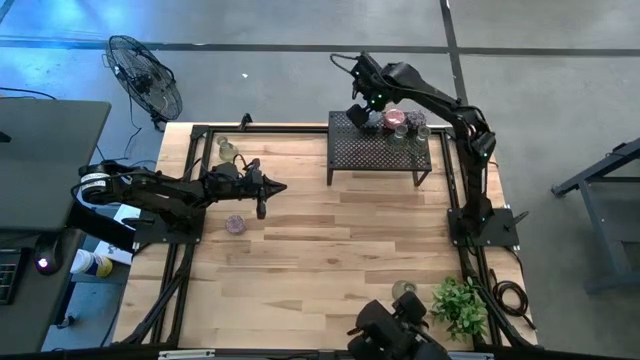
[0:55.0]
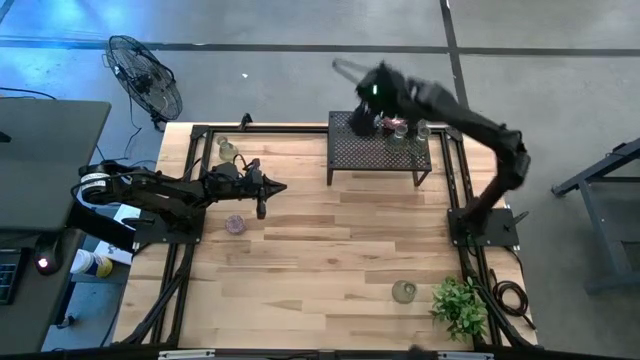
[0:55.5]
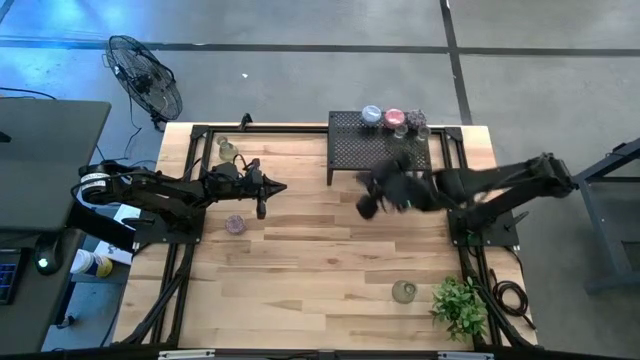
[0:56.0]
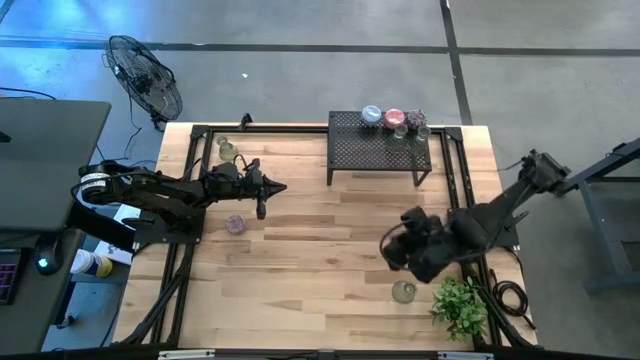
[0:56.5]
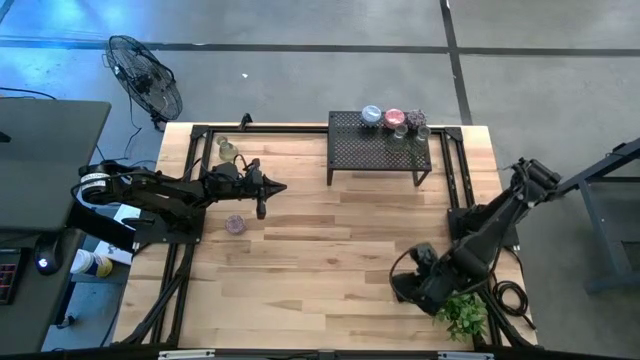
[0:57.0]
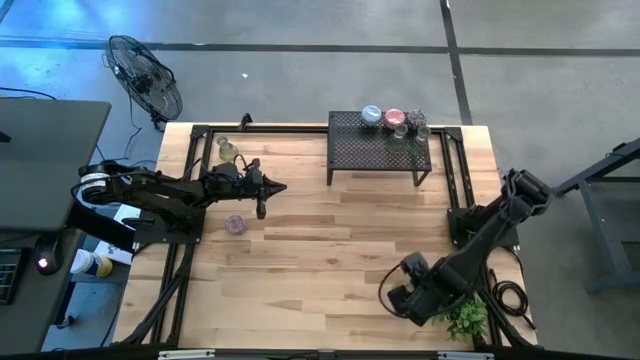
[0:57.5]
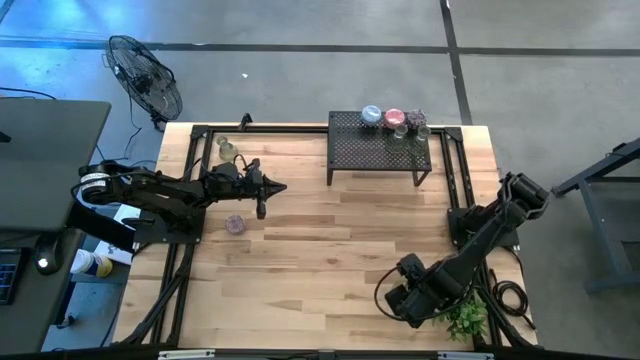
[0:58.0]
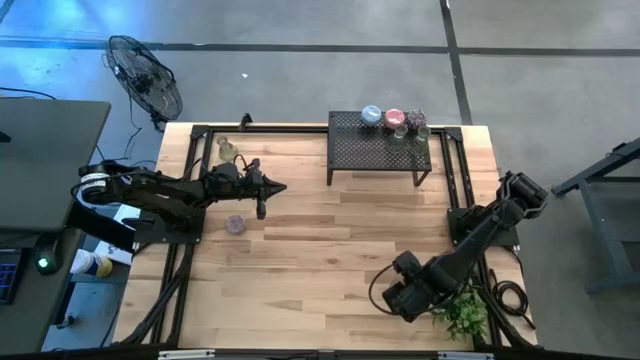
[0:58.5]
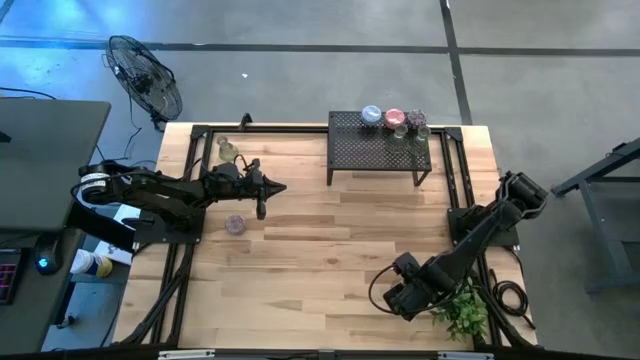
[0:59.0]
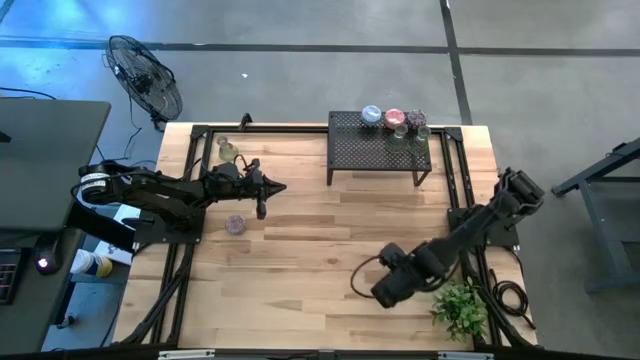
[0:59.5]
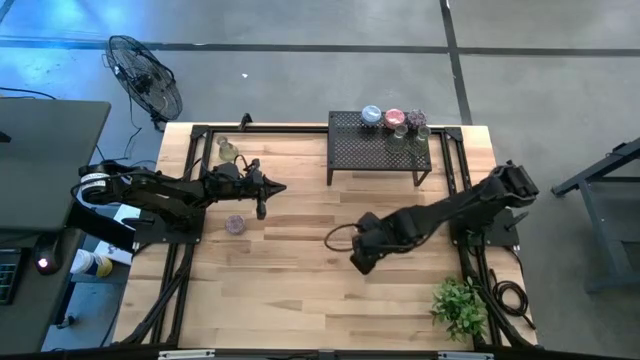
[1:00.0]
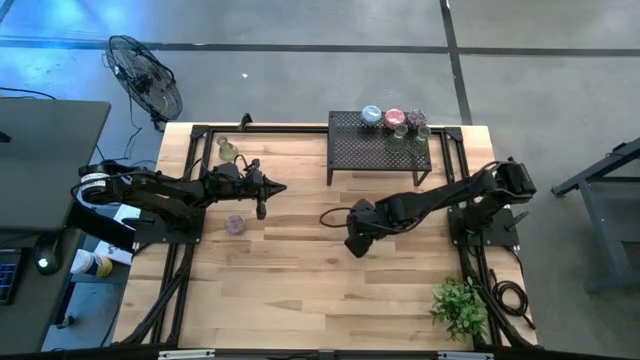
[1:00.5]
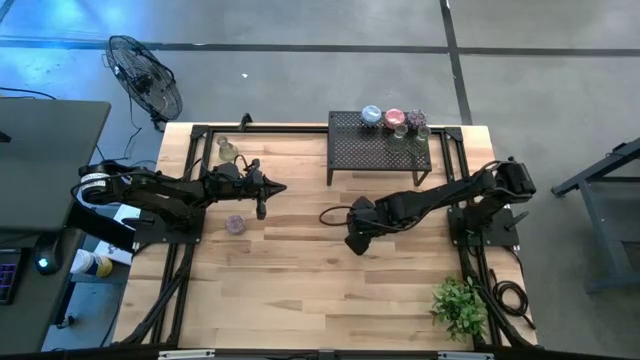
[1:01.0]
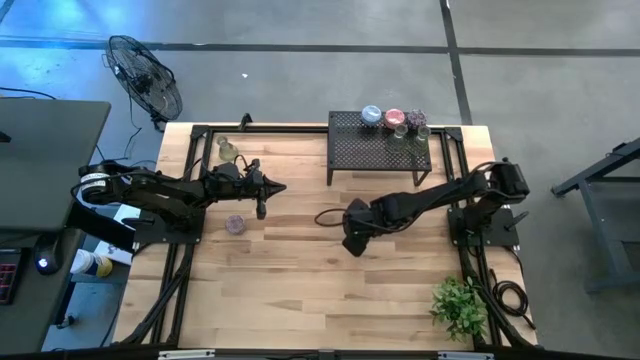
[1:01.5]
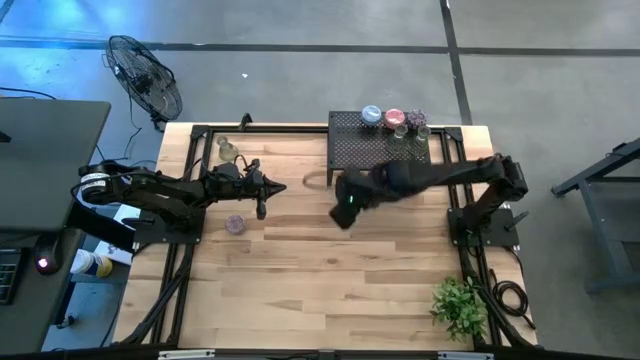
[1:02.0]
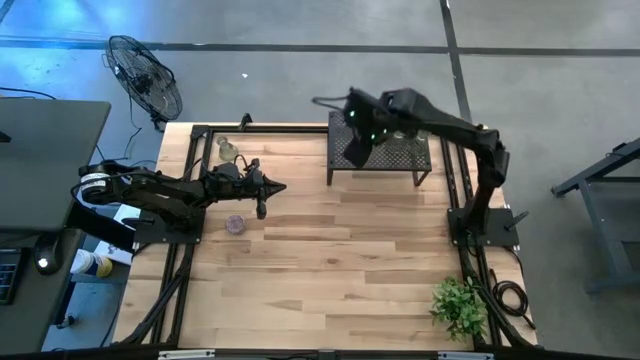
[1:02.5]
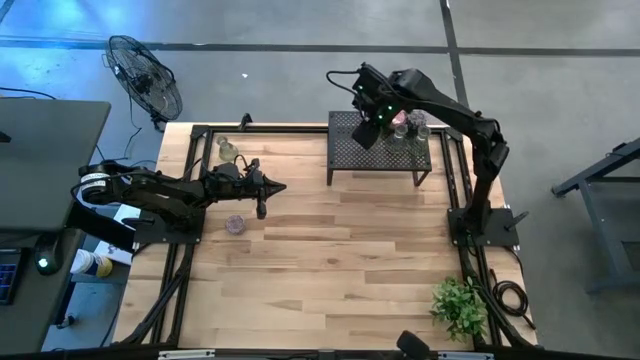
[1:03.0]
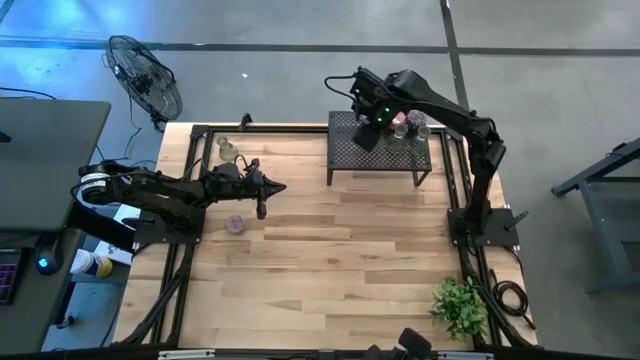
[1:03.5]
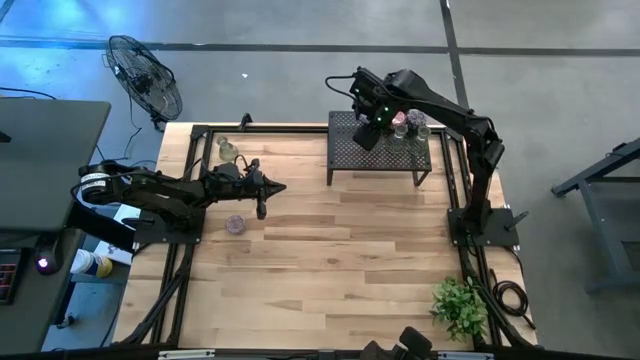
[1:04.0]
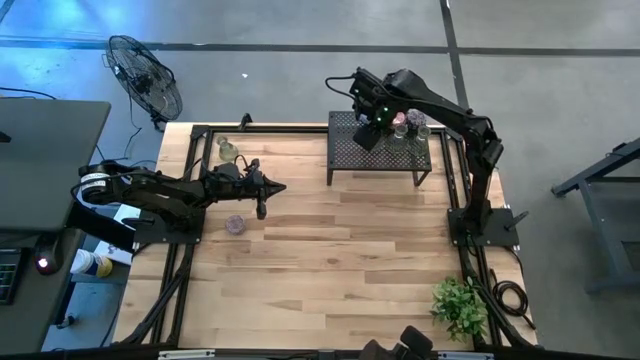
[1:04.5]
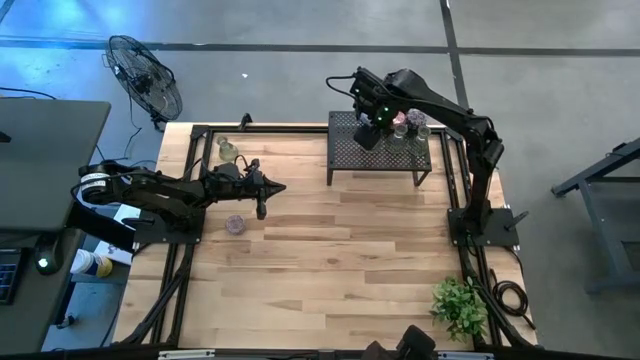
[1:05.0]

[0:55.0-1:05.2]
Task: Pick & Place candle stick holders
Put the green glass candle holder on the shelf aligned with the other green glass candle holders

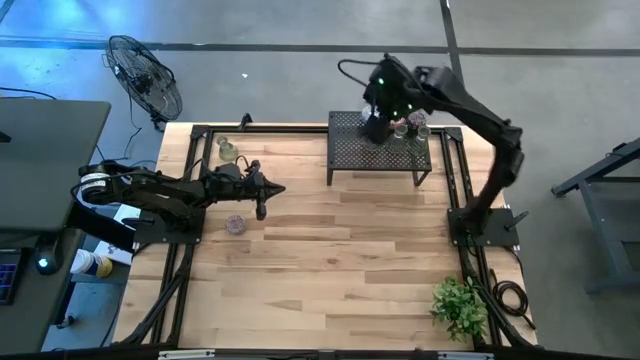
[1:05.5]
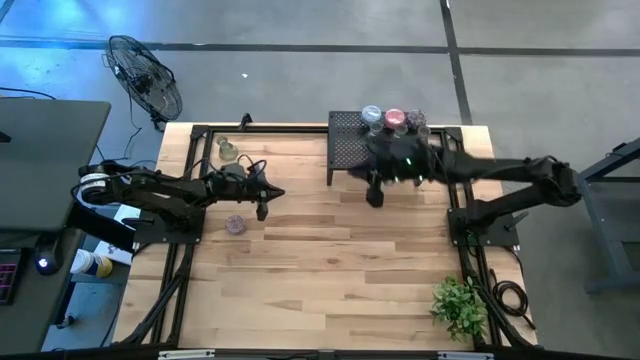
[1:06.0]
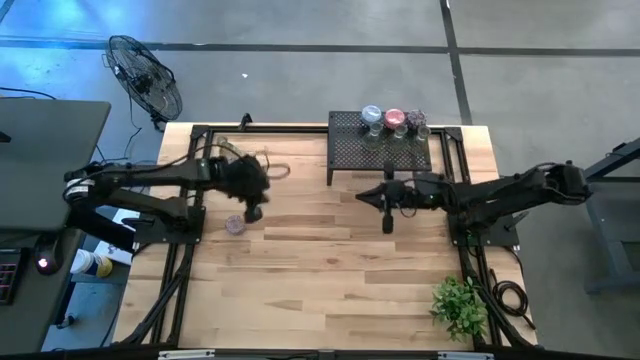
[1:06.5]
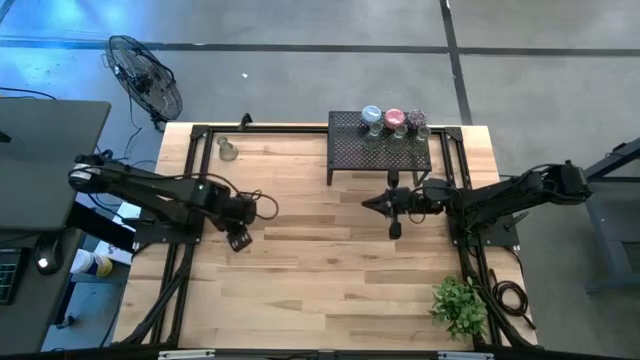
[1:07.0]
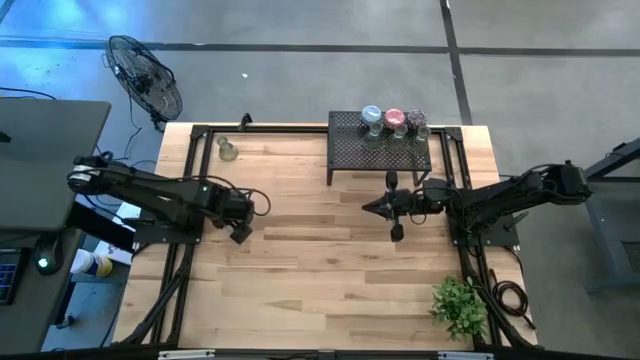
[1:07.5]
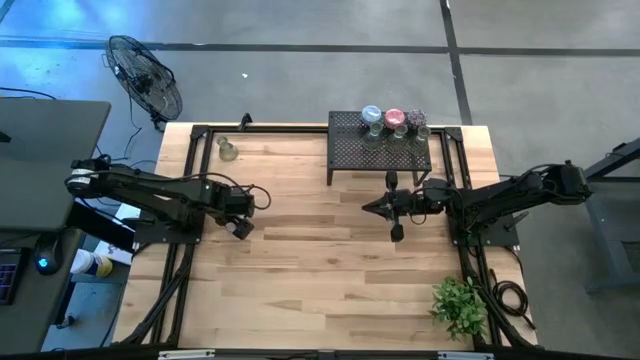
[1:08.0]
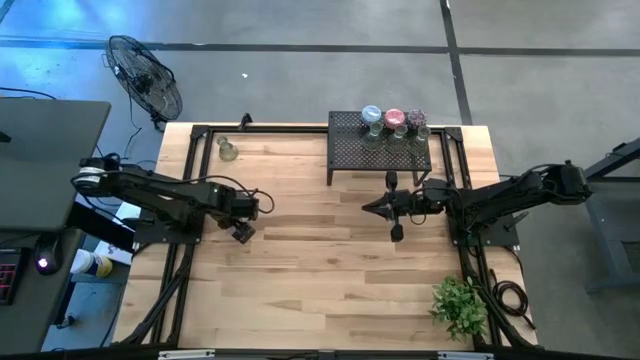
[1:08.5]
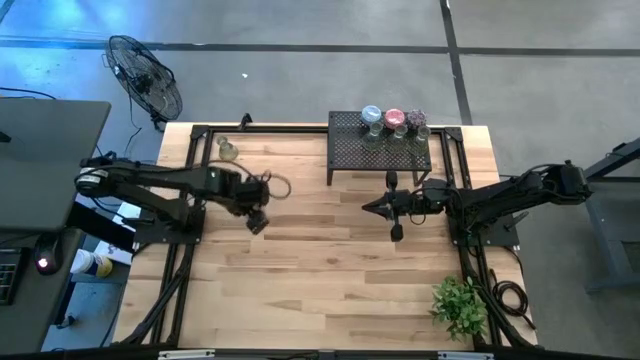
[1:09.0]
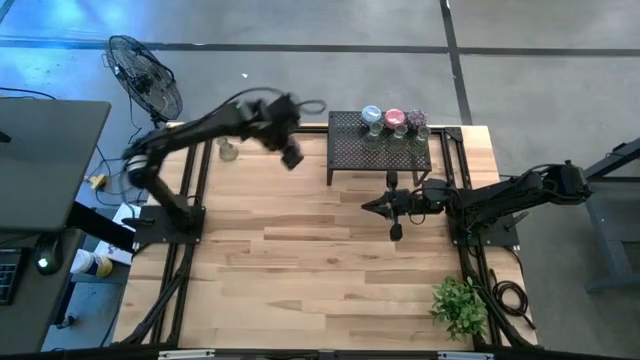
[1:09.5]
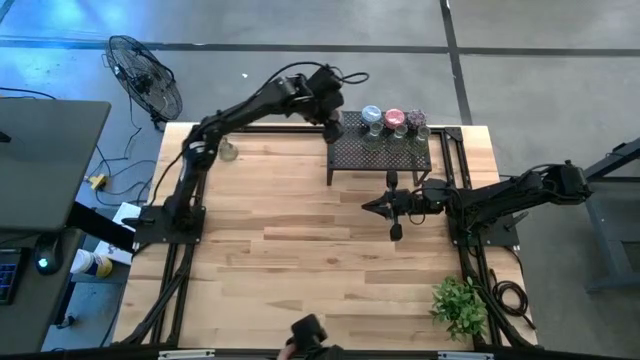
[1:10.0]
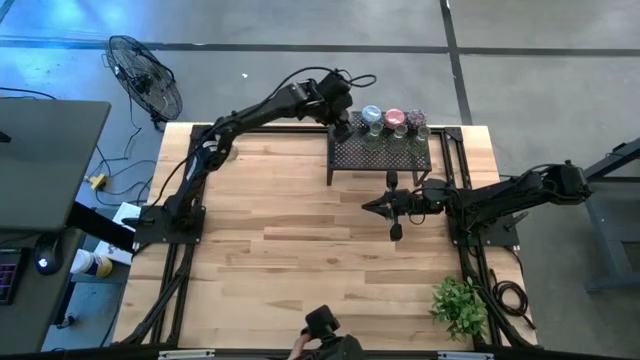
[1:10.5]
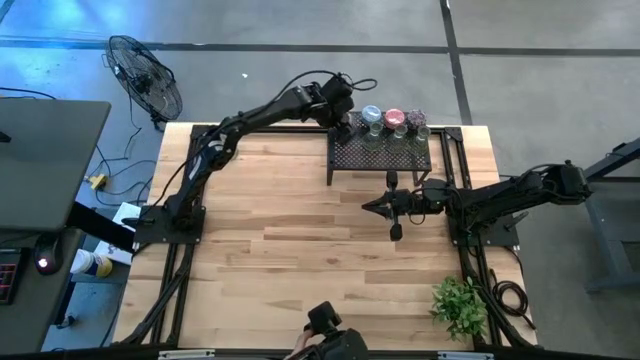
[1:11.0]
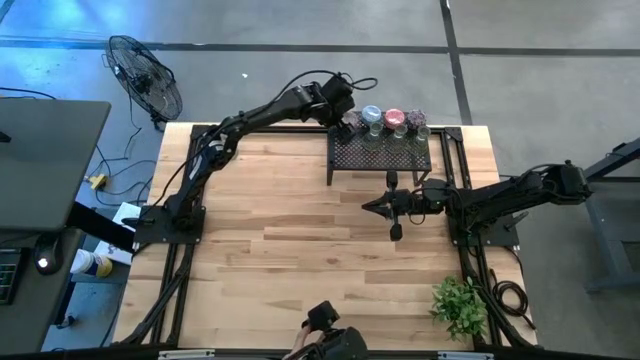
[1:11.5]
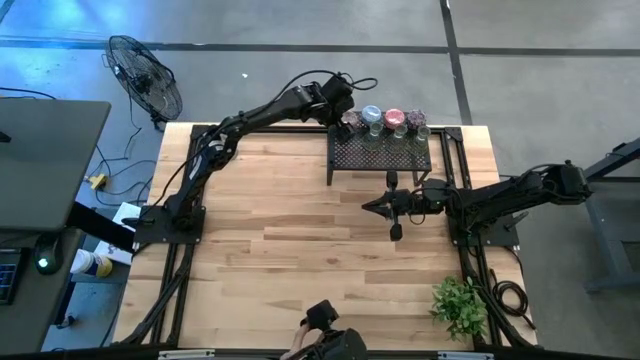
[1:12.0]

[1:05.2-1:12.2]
Put the red scented candle on the shelf

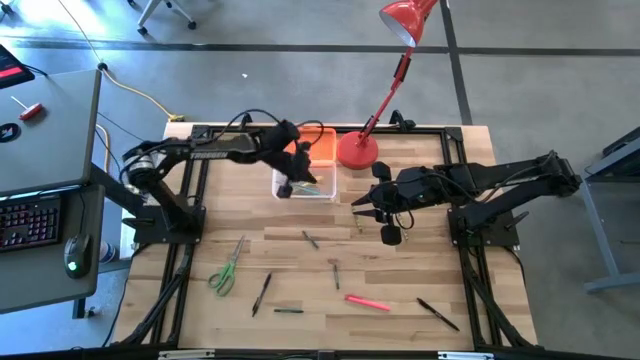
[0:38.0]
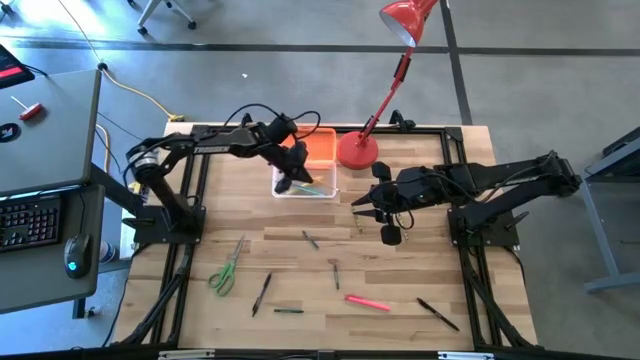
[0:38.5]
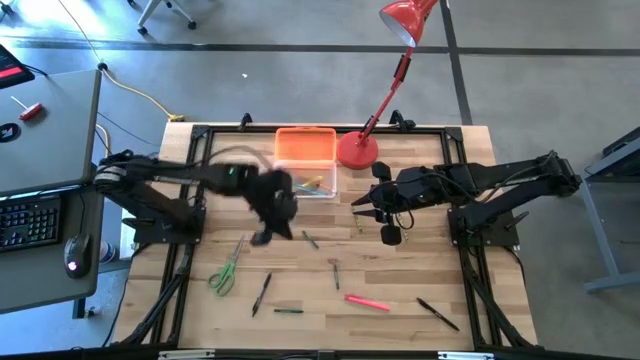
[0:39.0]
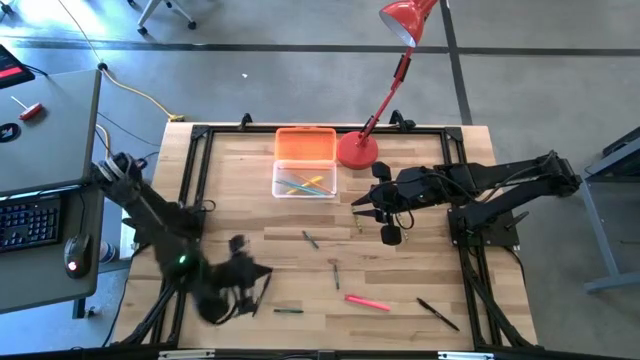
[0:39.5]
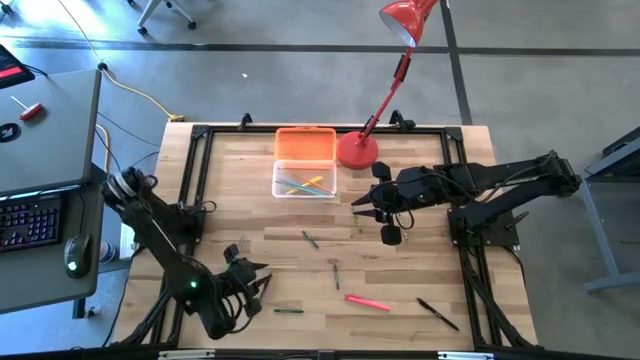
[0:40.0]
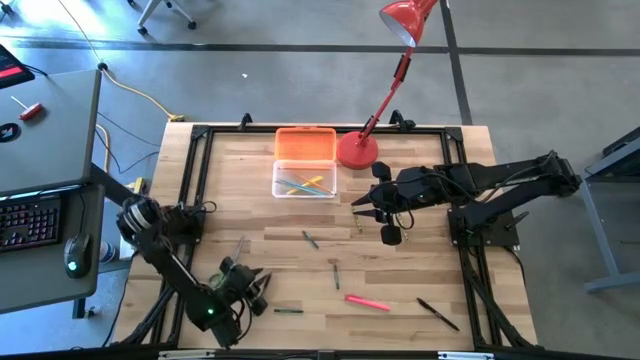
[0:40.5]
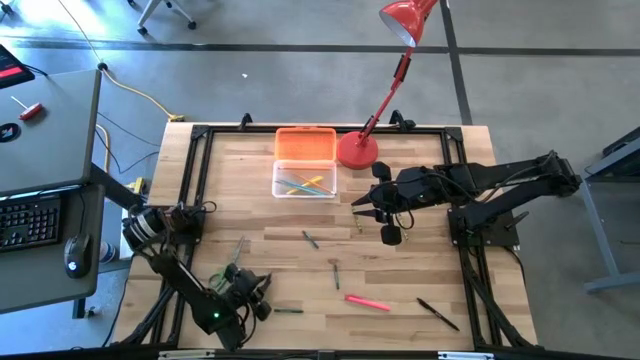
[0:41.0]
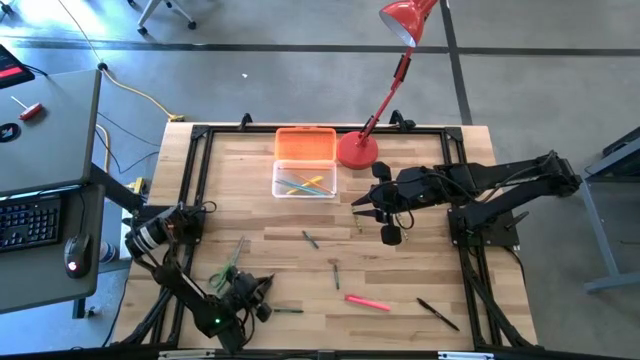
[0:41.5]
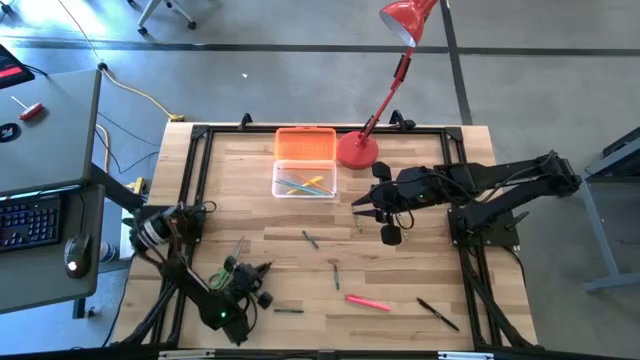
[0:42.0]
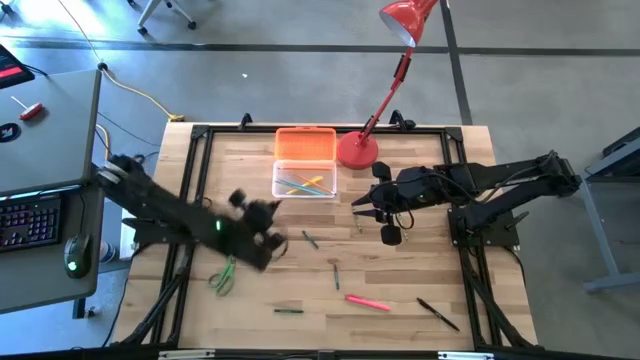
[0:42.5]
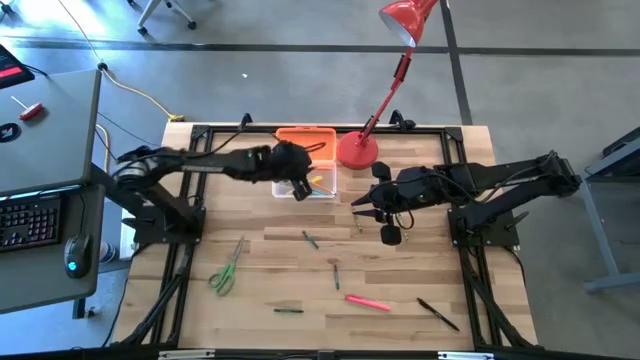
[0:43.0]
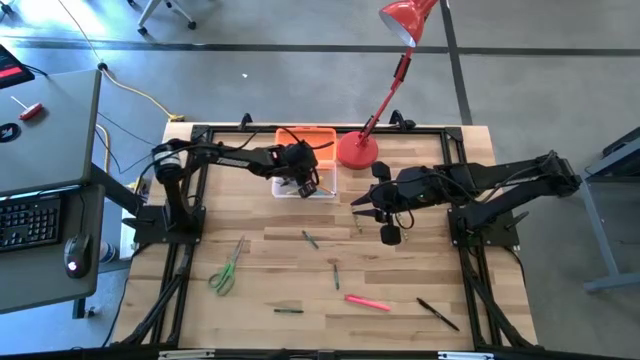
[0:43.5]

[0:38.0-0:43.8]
Task: Pick & place school supplies into a supply box
Put the left black pen into the orange supply box
